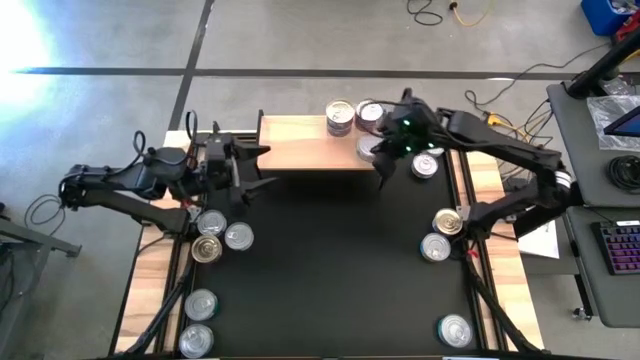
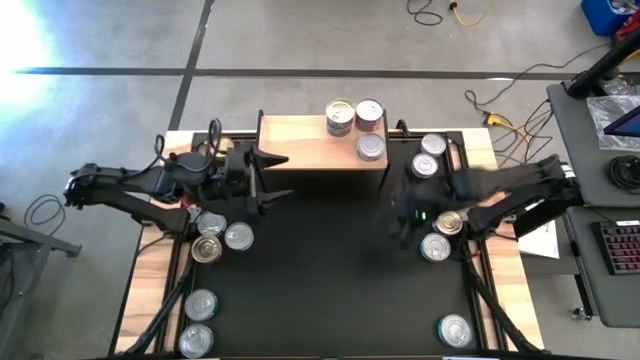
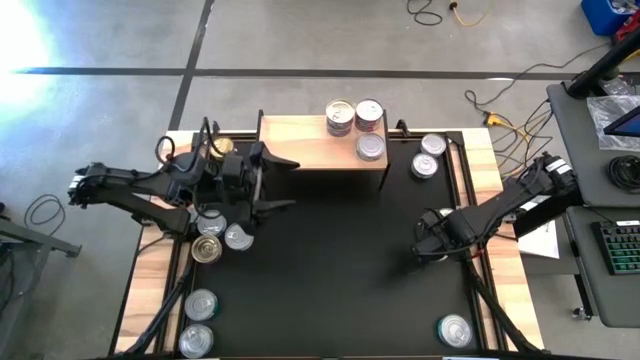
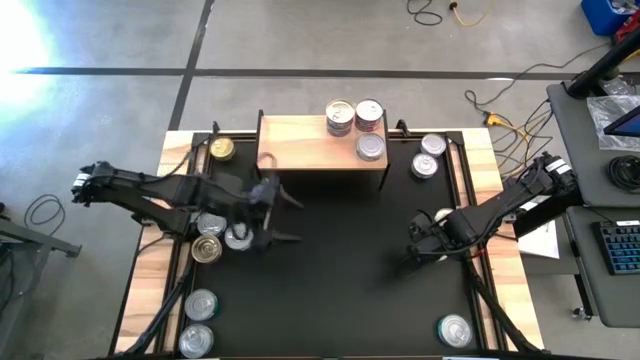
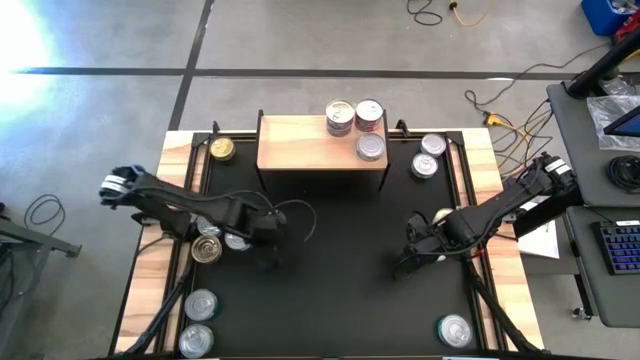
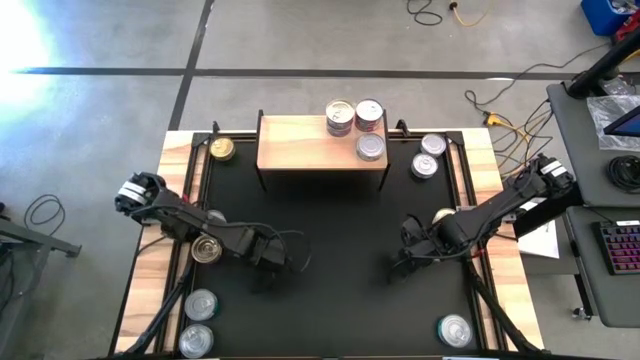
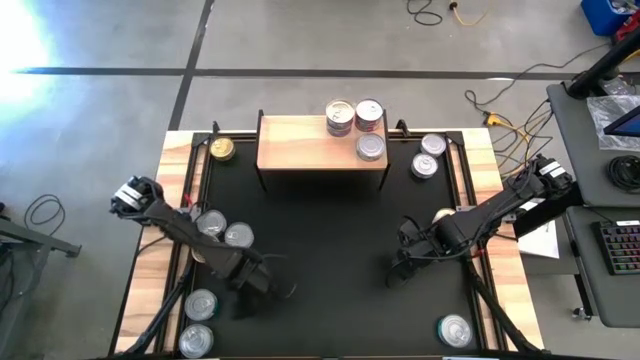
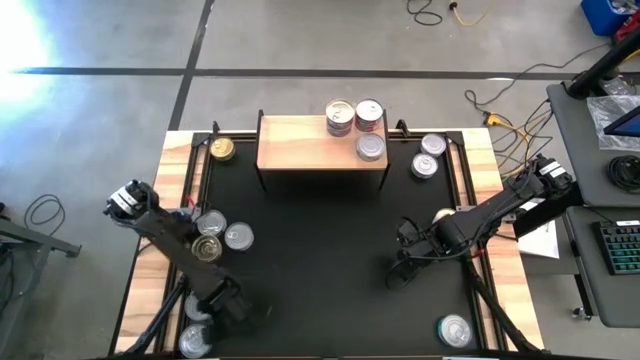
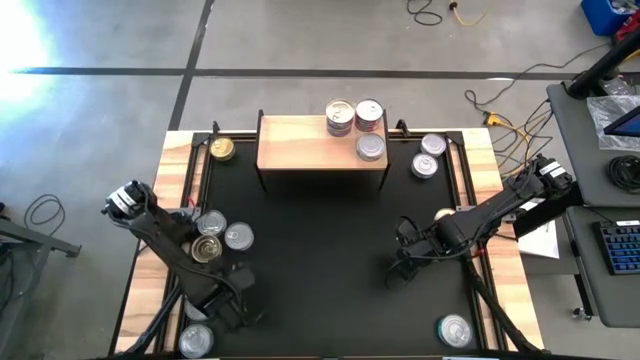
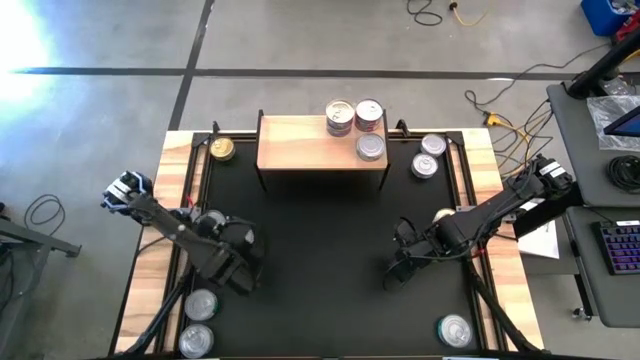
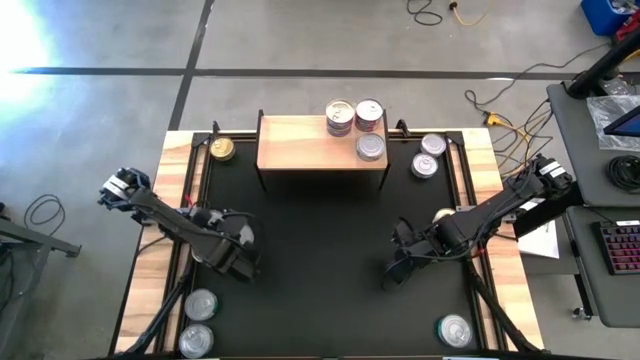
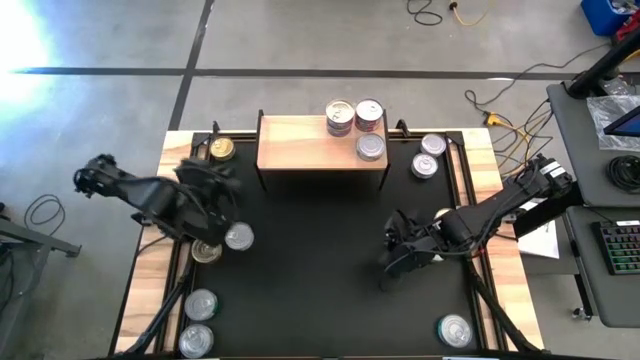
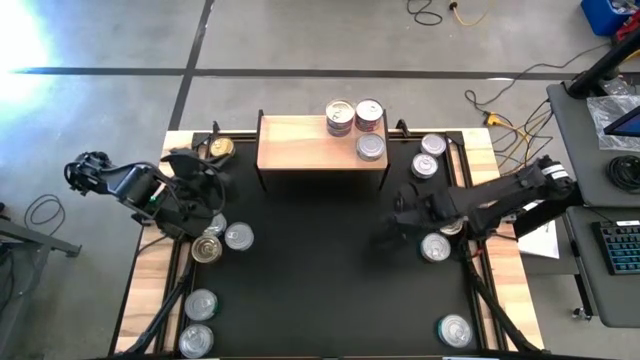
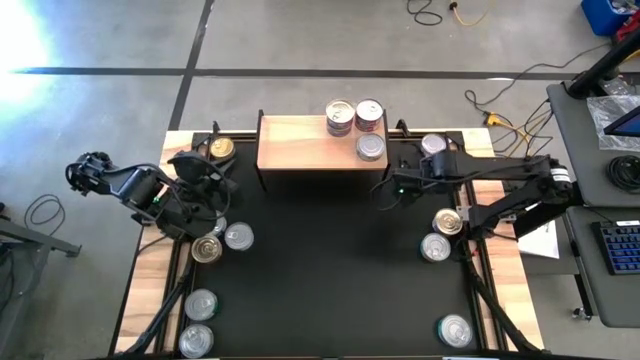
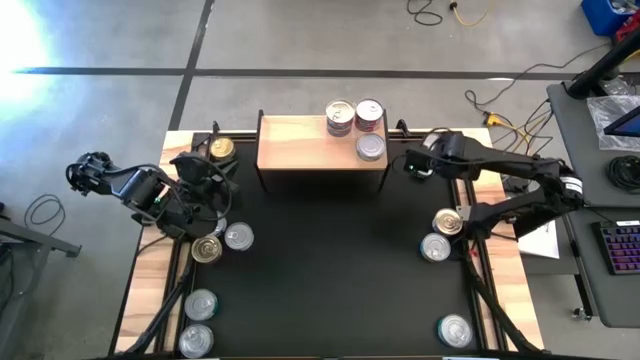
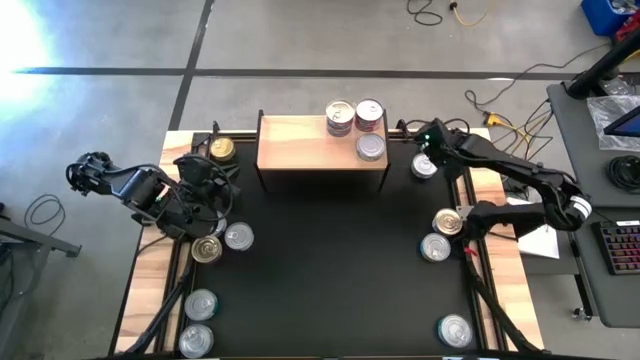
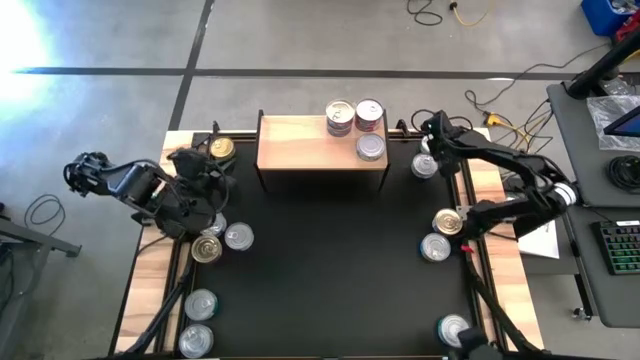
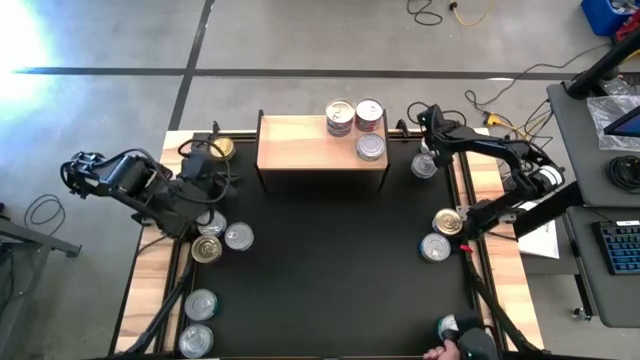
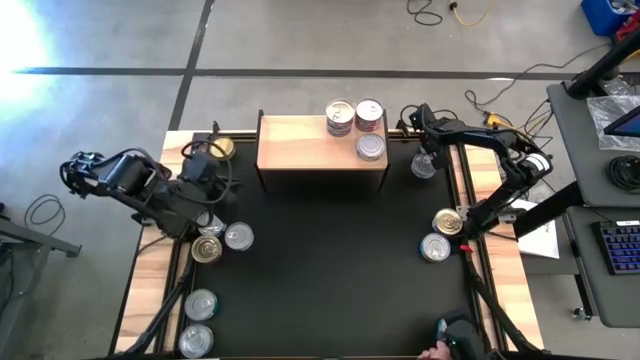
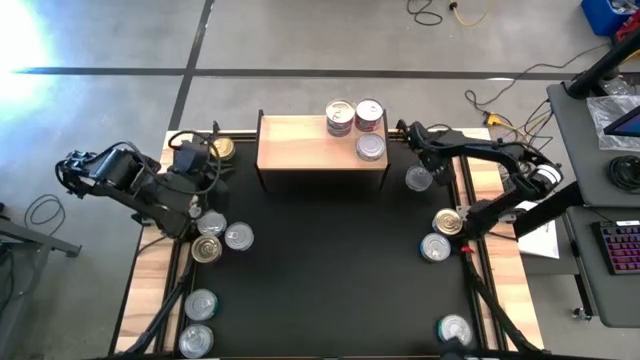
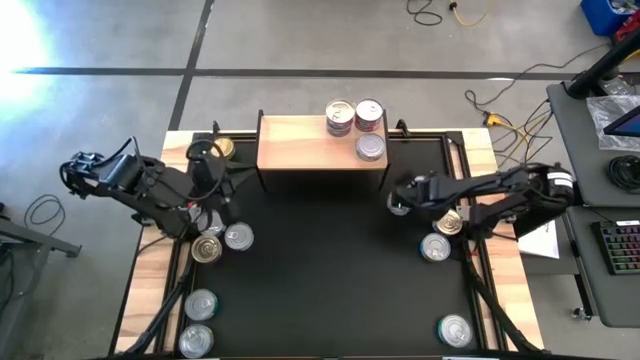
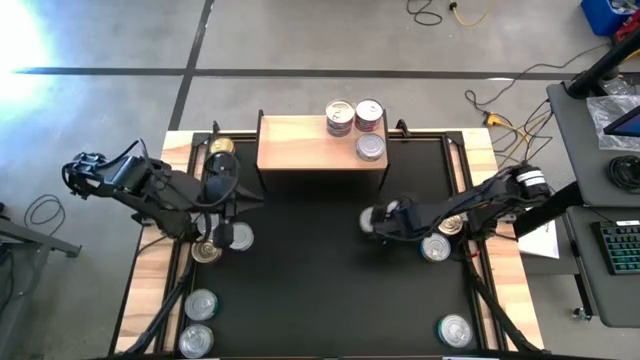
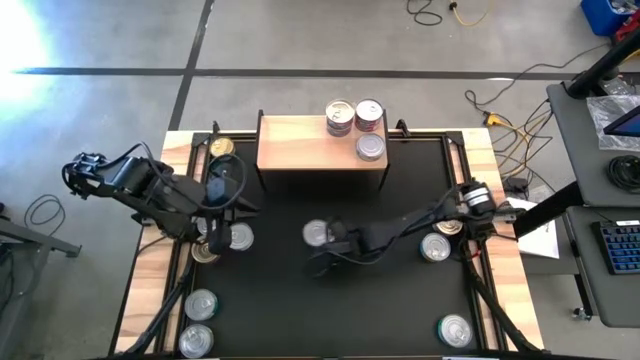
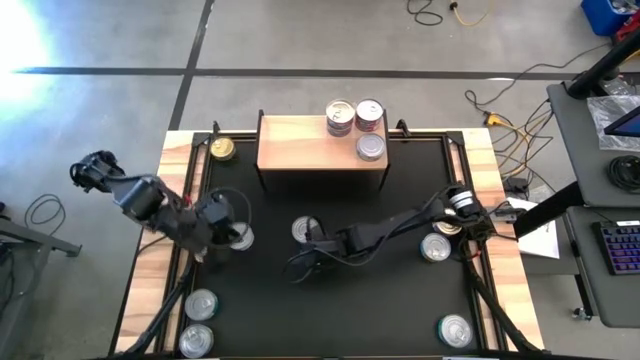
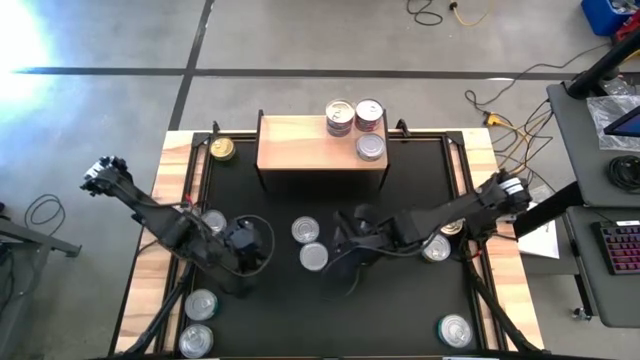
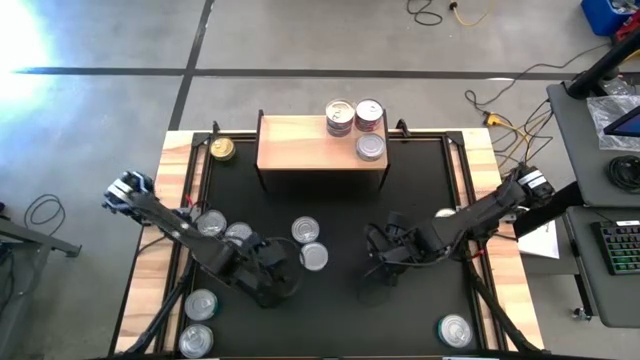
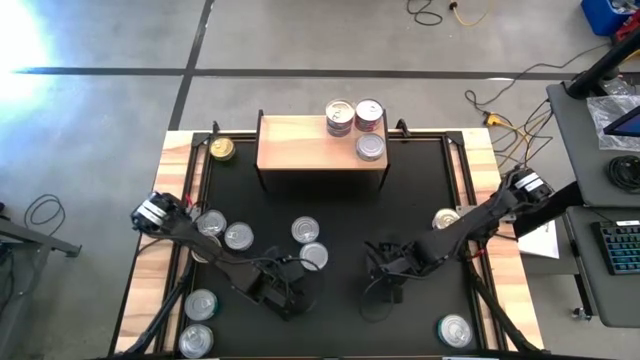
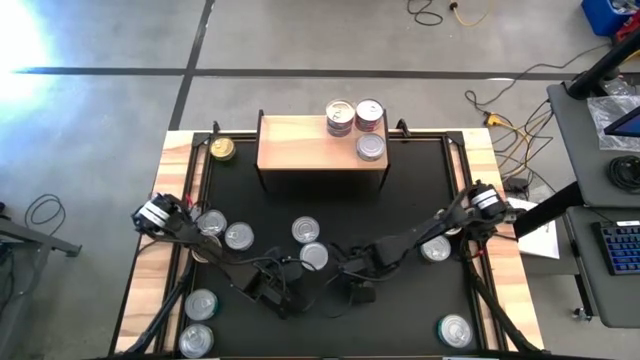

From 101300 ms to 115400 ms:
Task: Stack canned seafood by type on shelf
Stack the white-green tuna can on top of the other green tuna can on the shelf

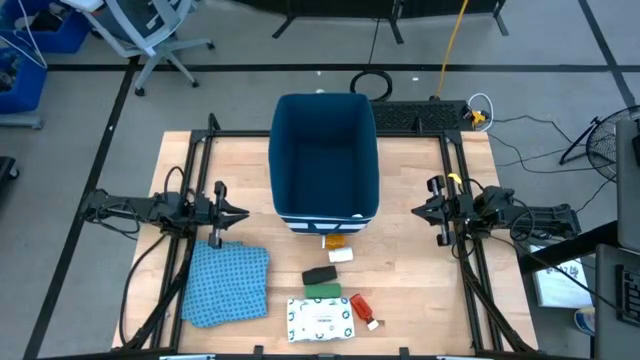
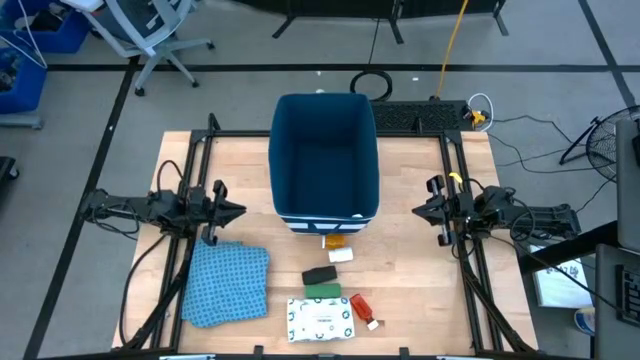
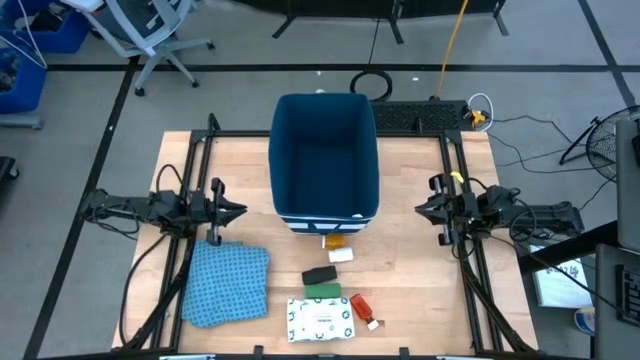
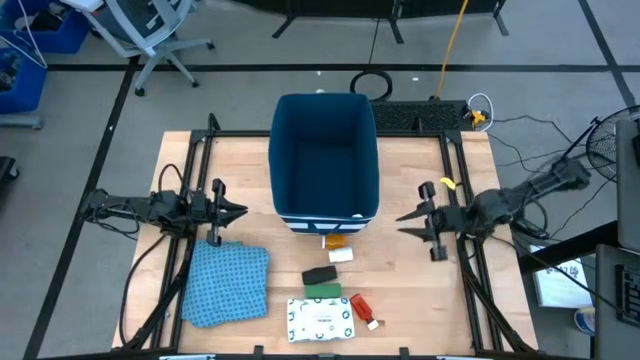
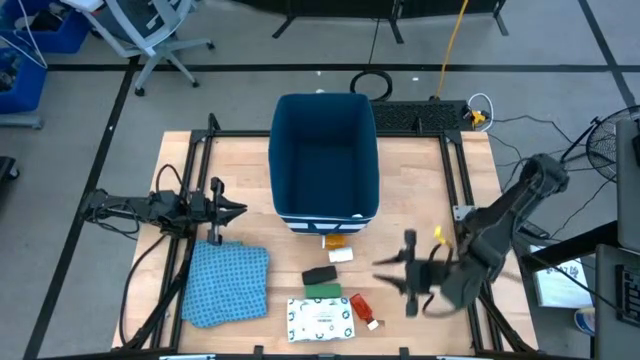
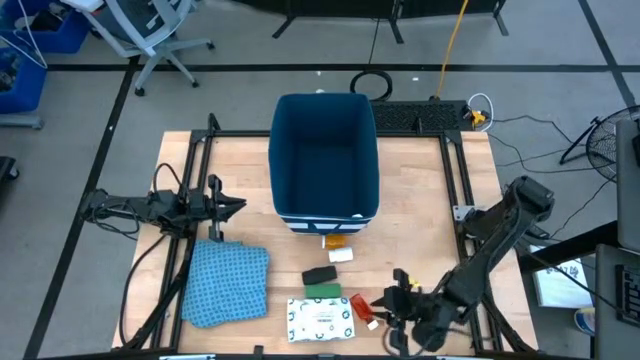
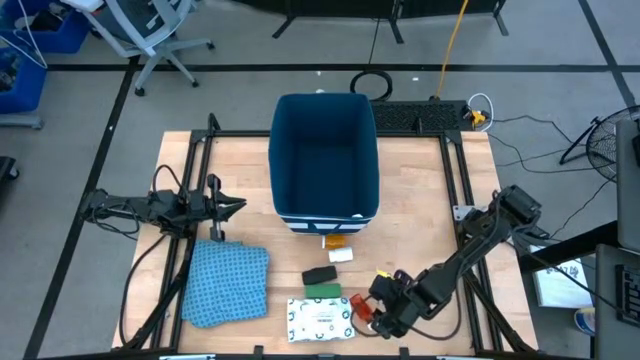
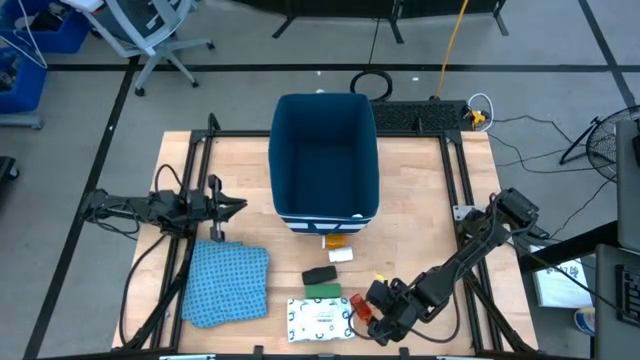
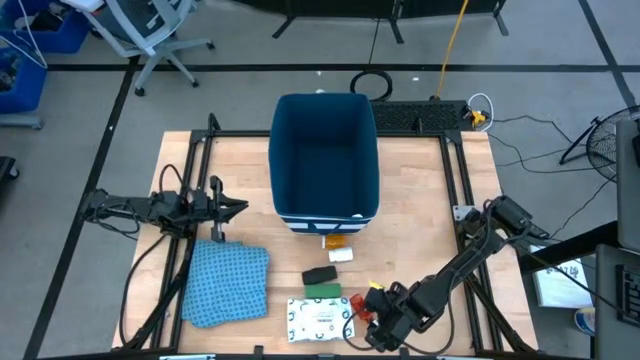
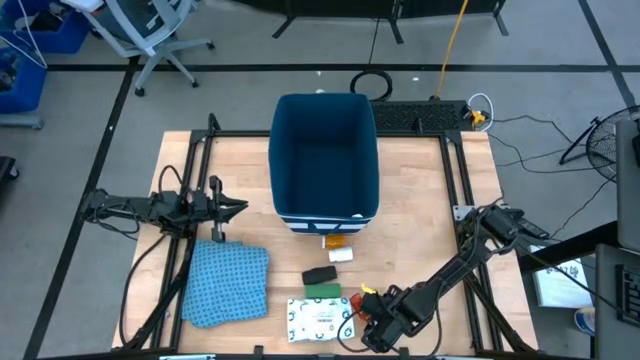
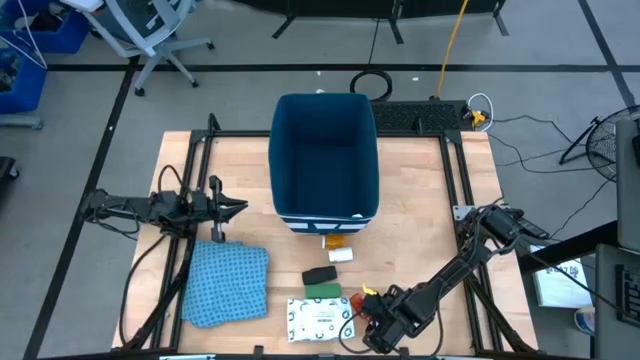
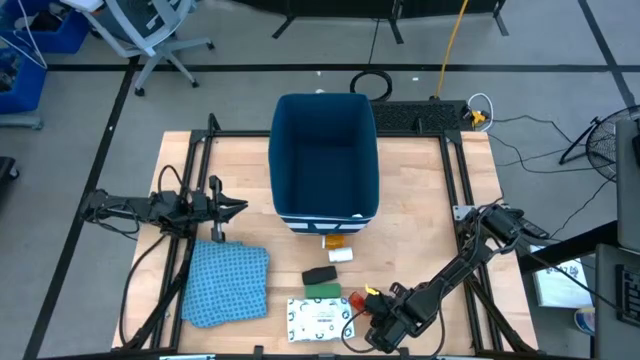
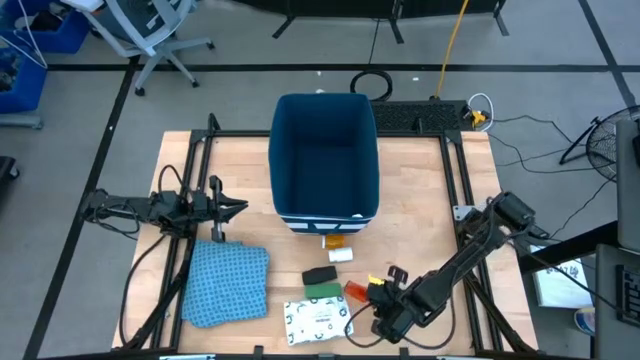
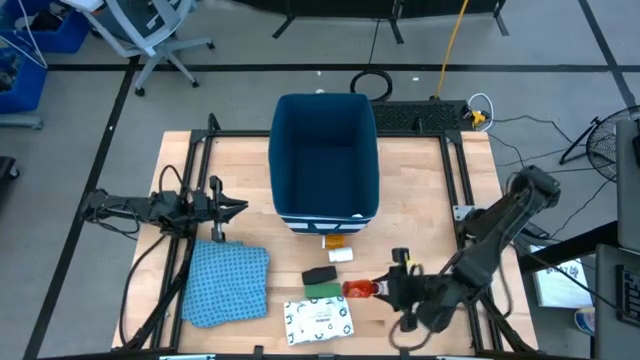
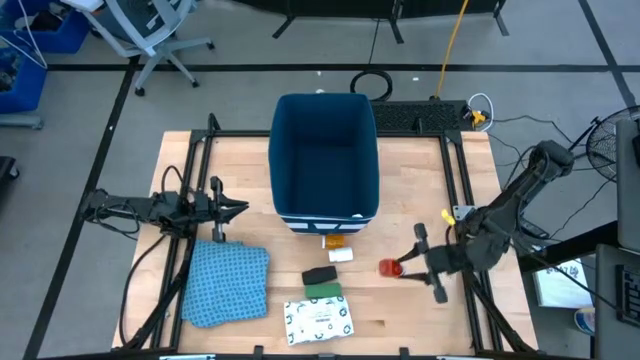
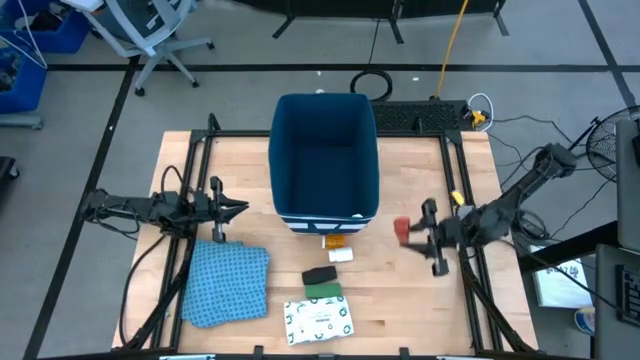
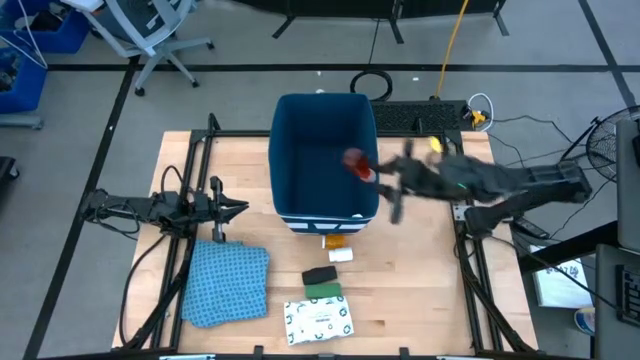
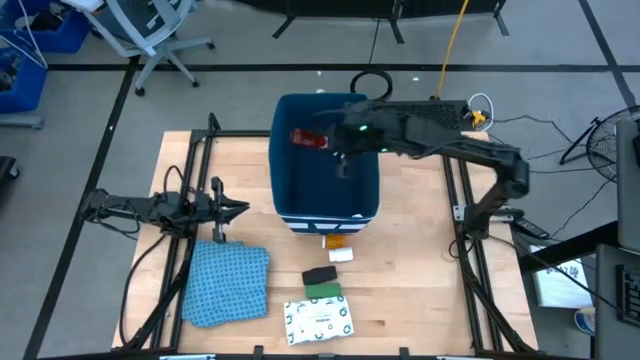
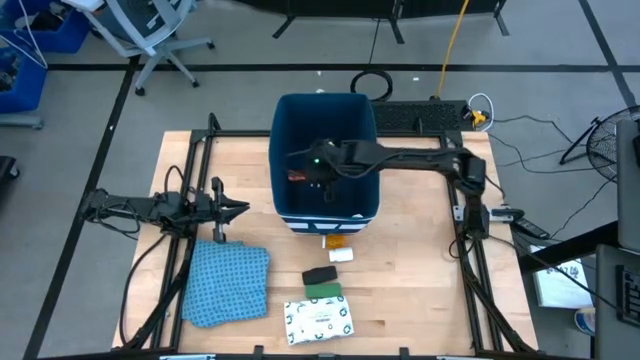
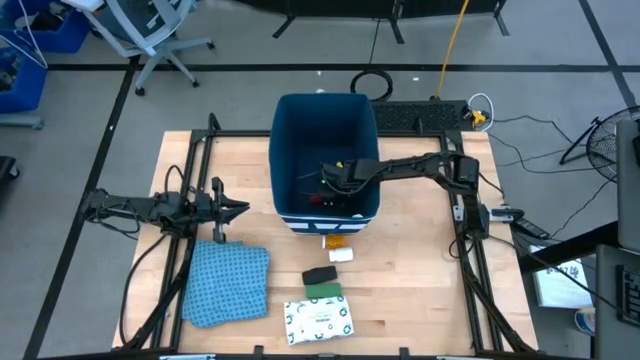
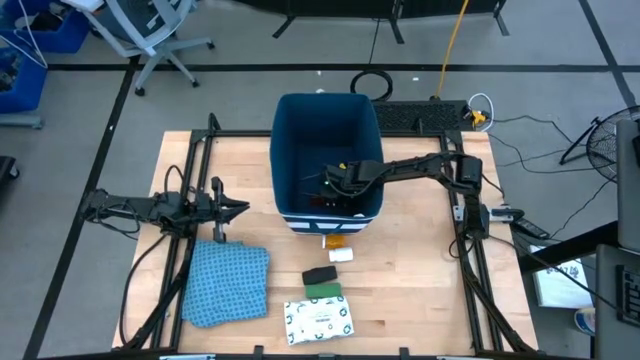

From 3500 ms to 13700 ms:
Task: Pick & place medical supplies in basket/bin
Put the red medicine bottle into the blue bin
